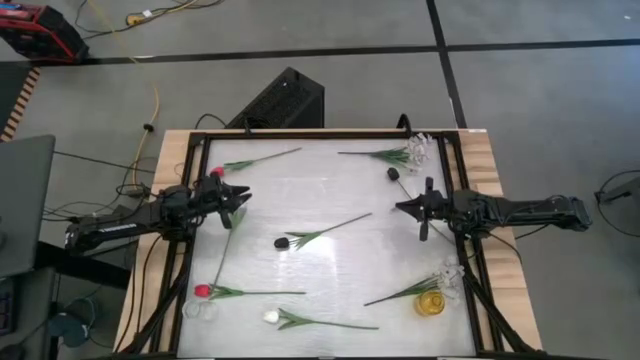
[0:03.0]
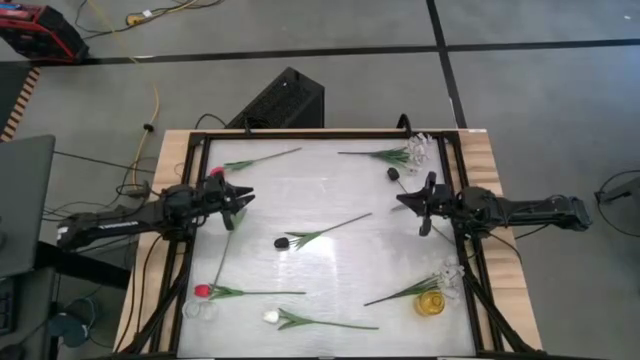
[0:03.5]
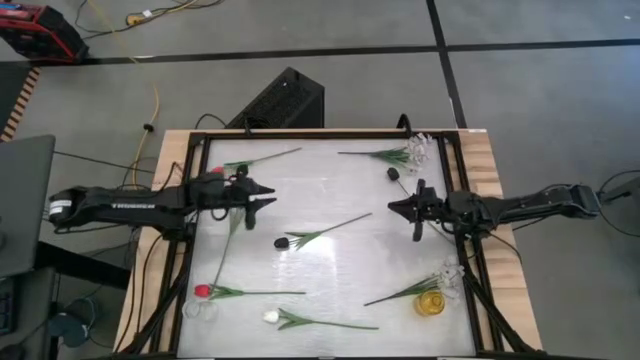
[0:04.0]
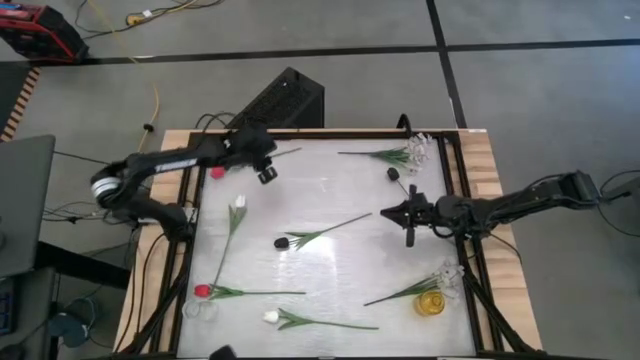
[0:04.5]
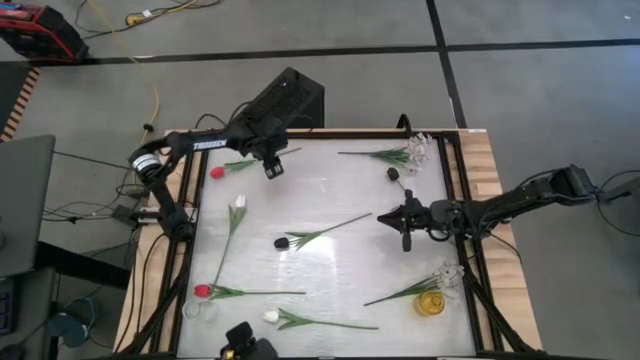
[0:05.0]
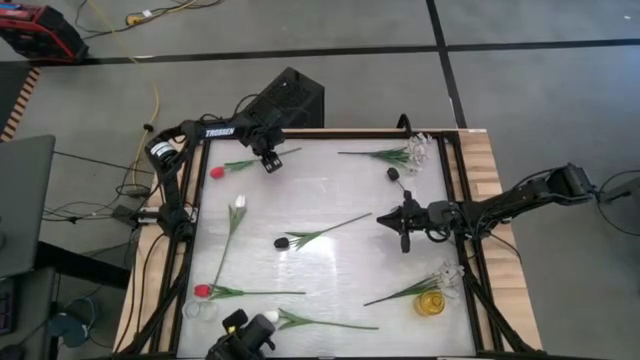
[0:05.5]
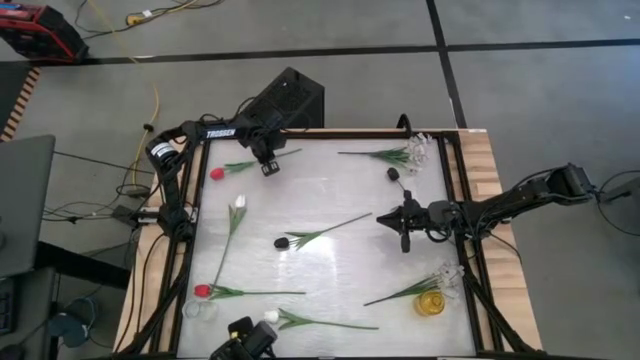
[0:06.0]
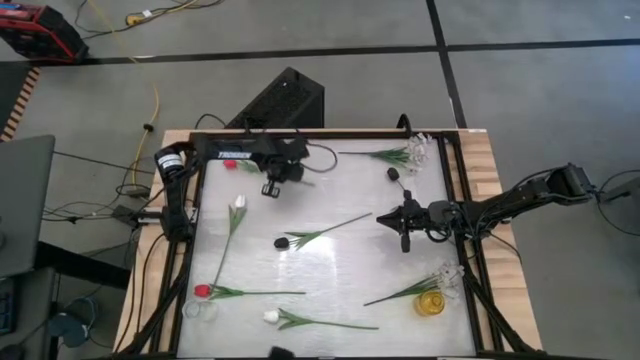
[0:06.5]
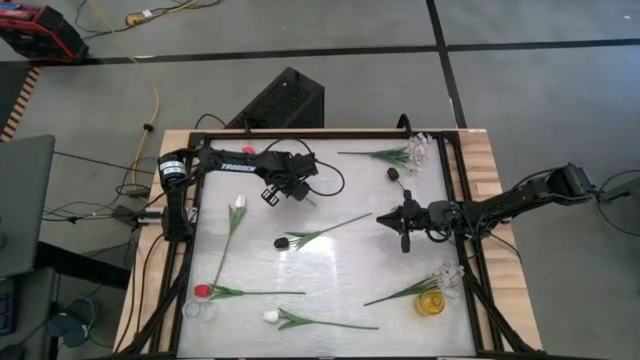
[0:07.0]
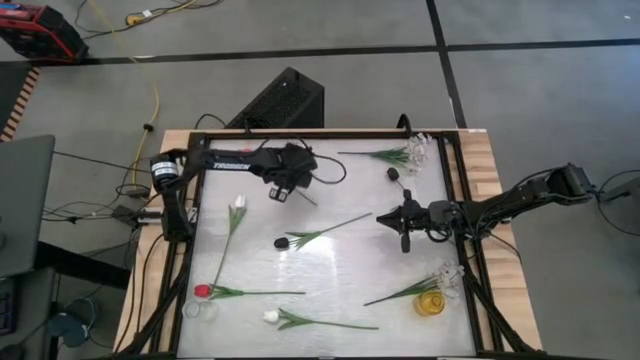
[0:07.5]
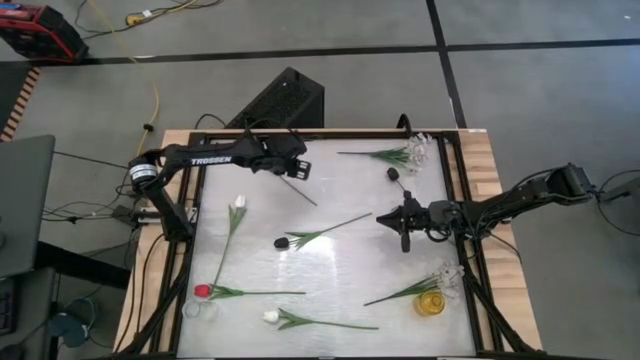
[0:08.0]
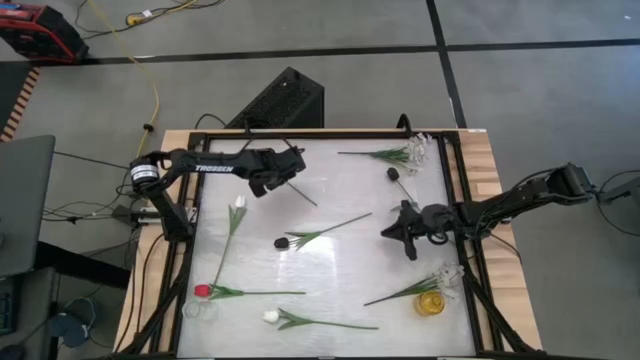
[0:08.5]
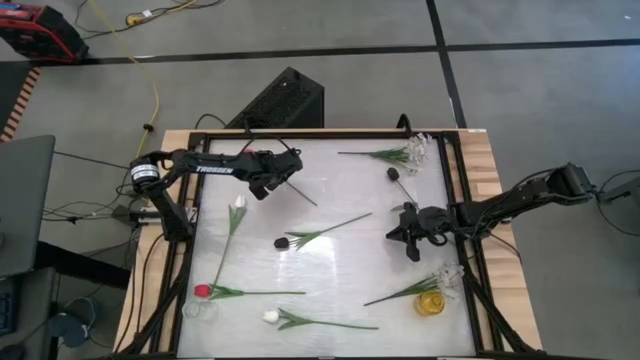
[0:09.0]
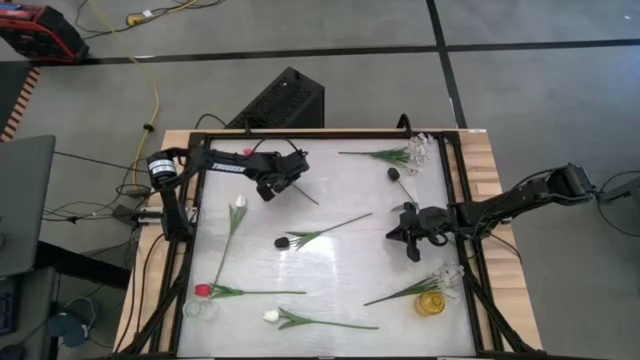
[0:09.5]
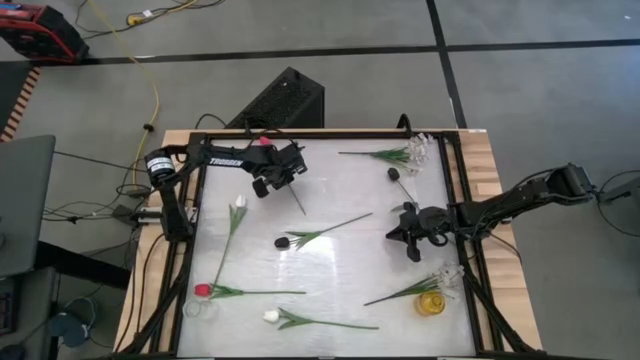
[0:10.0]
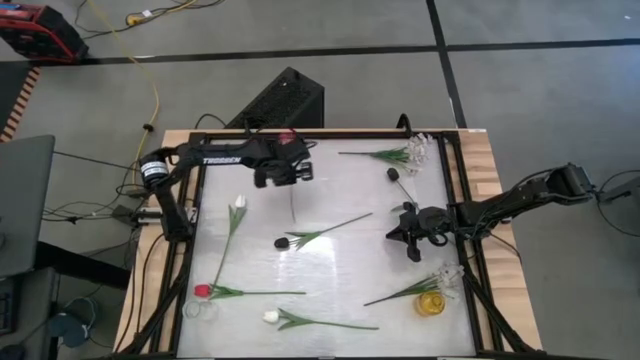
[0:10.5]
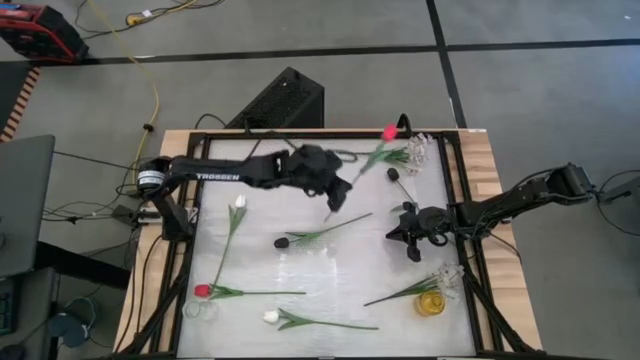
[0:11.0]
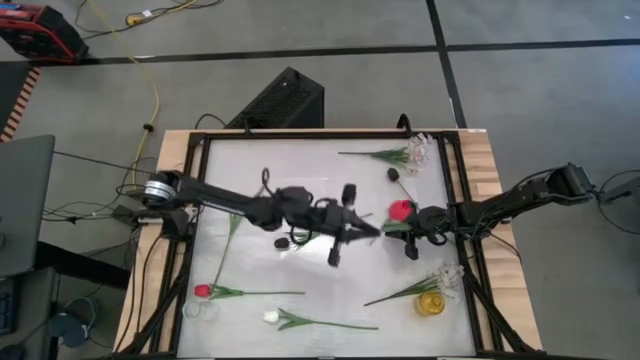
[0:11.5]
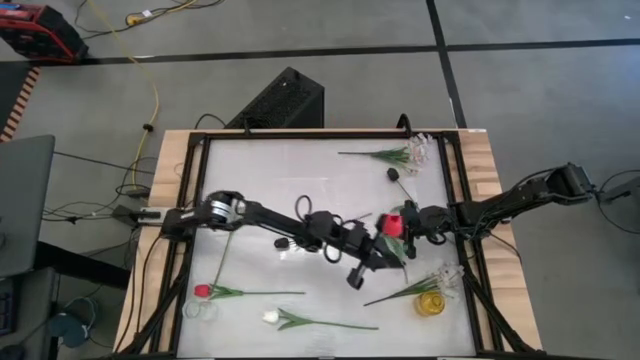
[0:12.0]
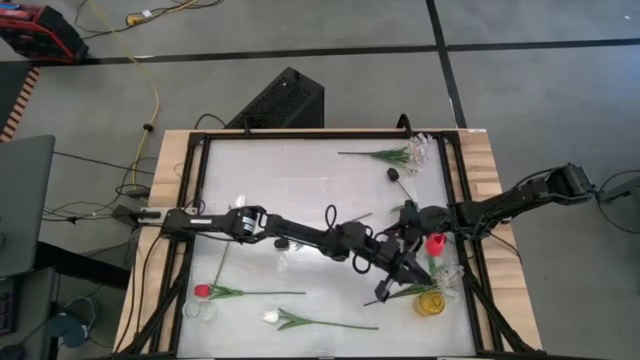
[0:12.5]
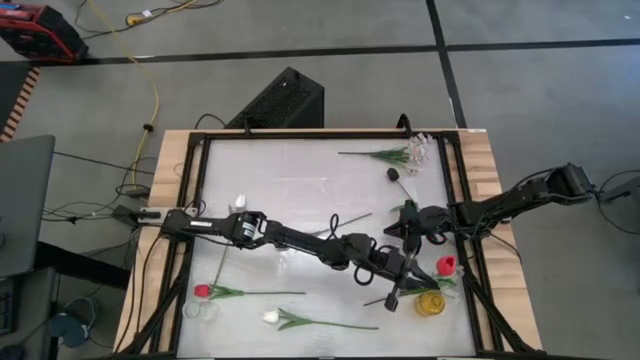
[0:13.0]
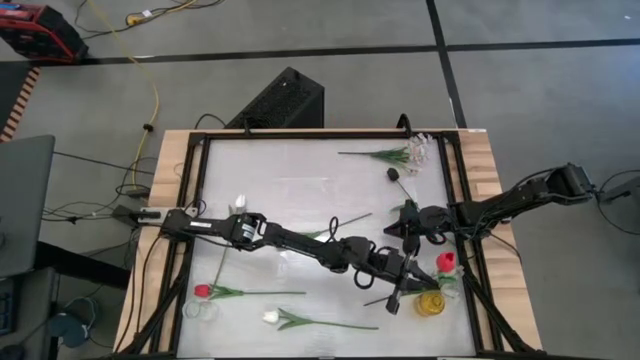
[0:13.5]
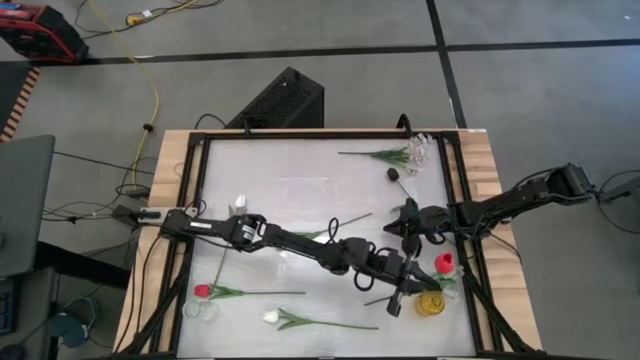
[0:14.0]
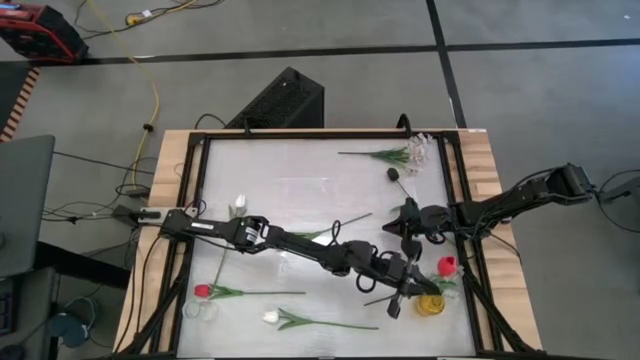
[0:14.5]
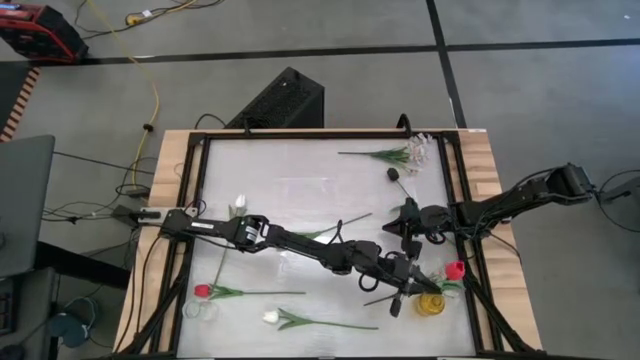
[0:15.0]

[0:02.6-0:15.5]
Task: Sort flowers into vase by color
Put the top red flower into the yellow vase

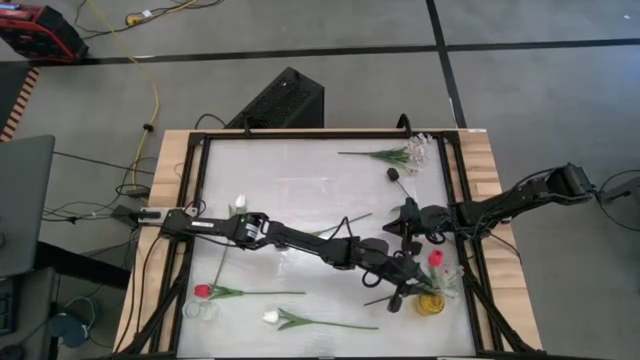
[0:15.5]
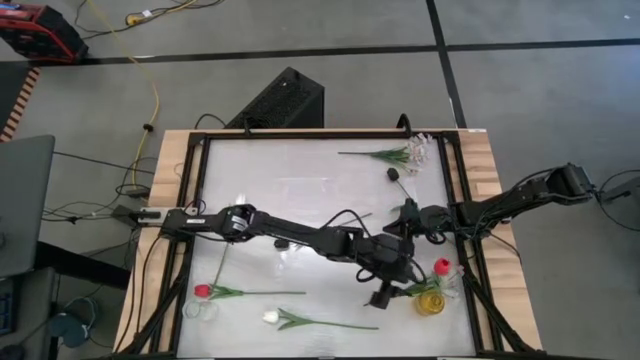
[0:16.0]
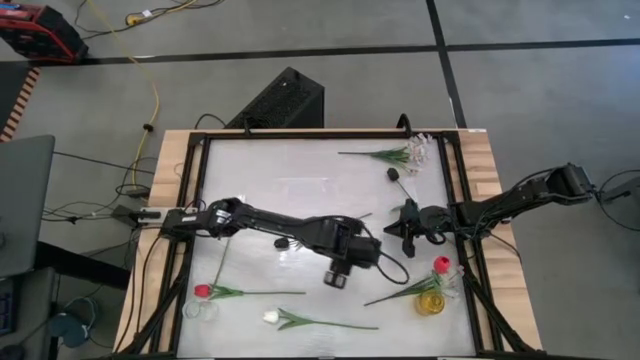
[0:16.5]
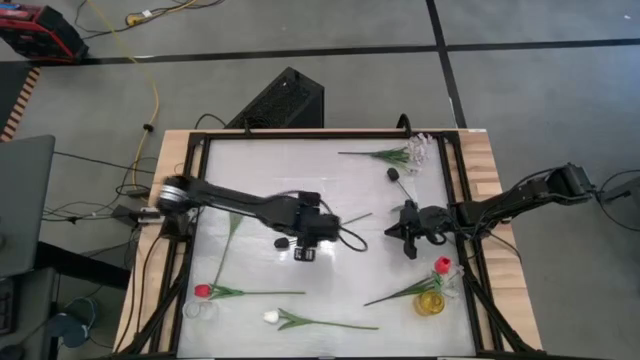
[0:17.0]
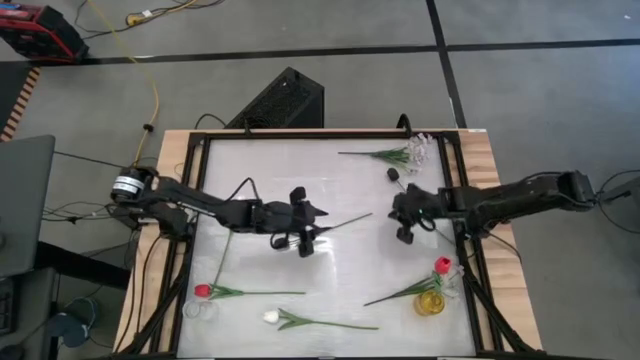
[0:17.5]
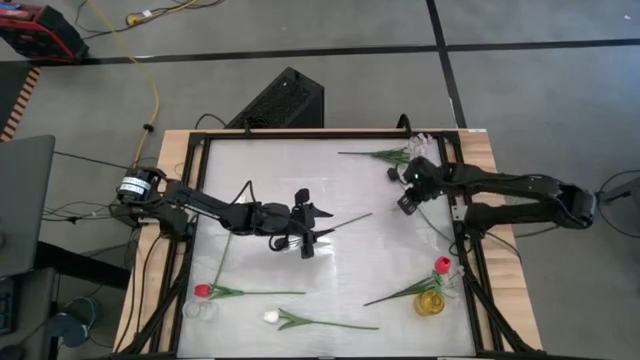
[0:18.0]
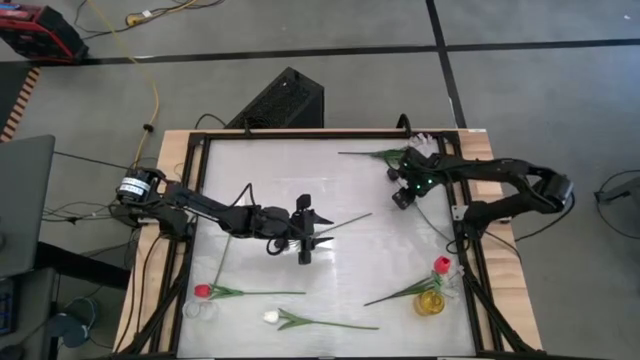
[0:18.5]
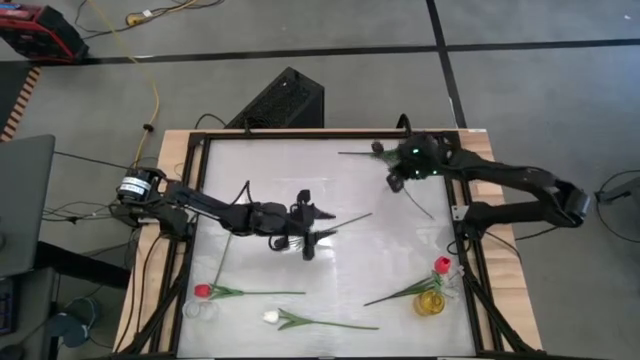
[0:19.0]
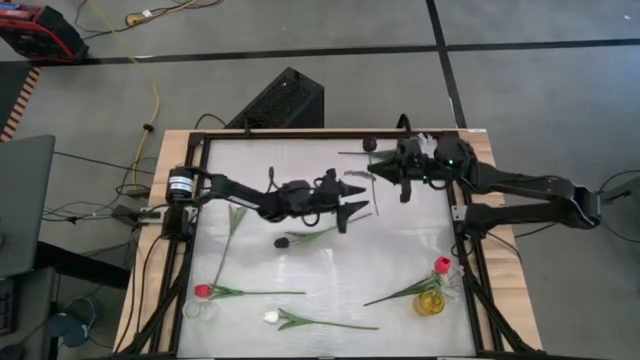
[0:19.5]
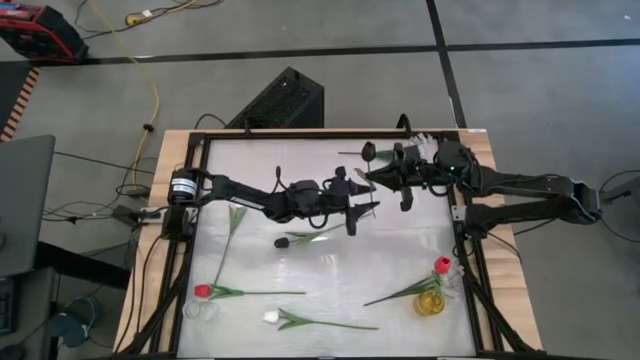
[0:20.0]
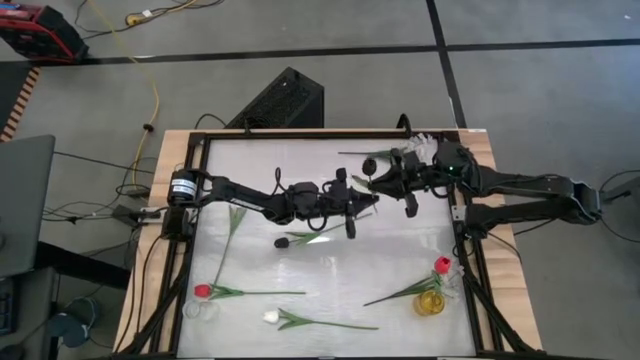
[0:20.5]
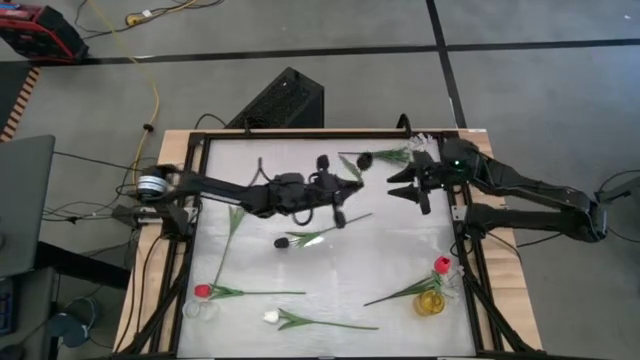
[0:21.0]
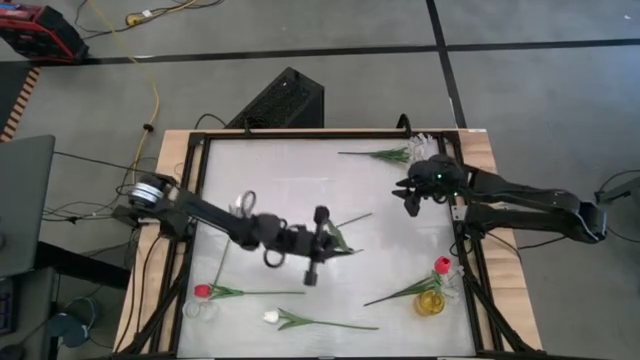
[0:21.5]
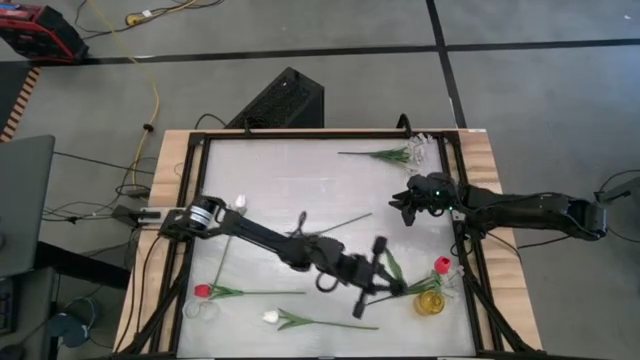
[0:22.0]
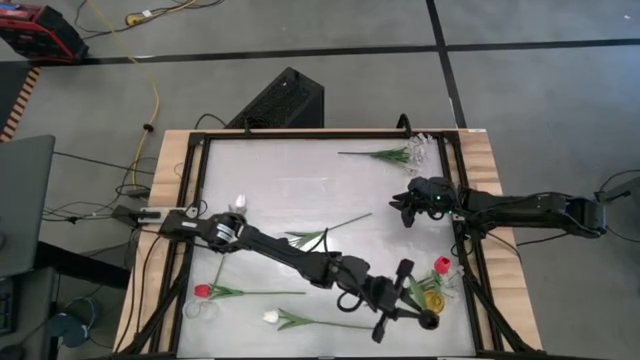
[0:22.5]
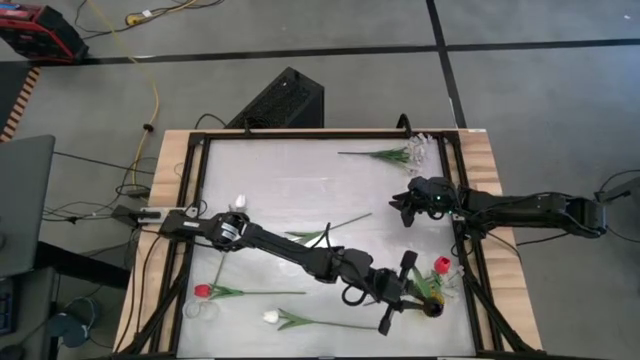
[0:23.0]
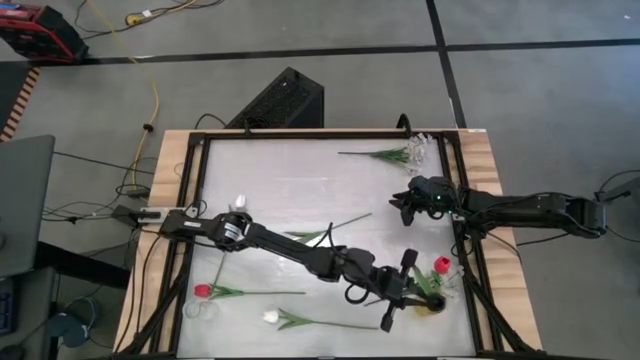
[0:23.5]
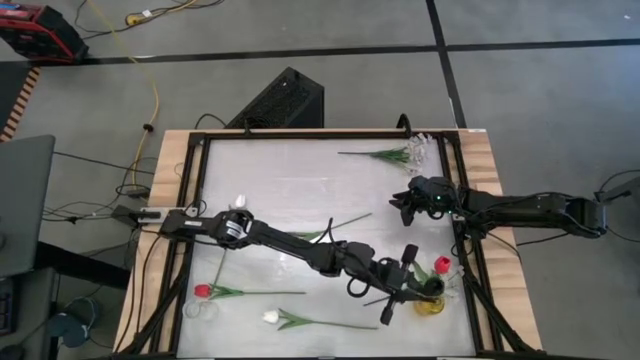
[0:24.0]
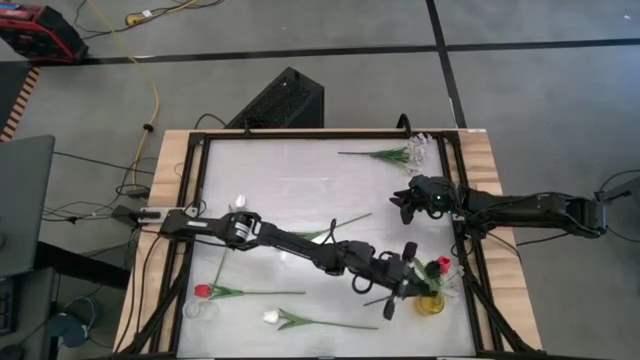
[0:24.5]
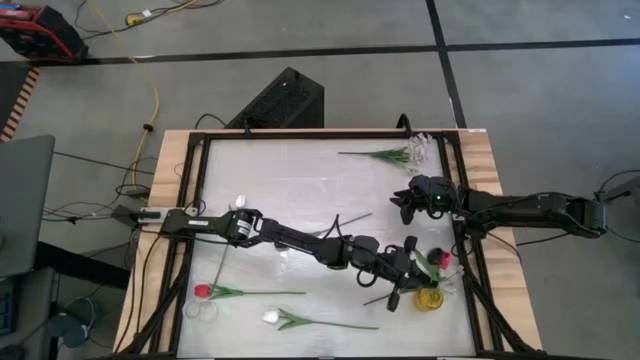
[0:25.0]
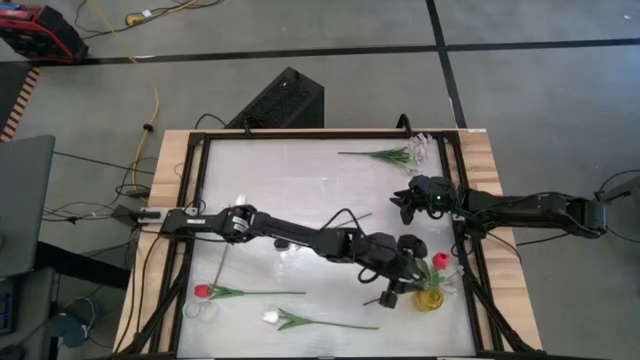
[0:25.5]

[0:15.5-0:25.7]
Put the top black flower into the yellow vase
